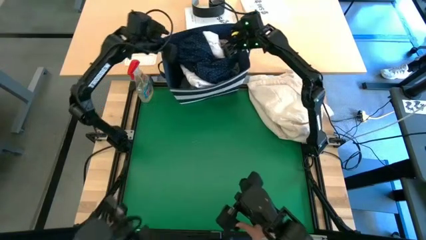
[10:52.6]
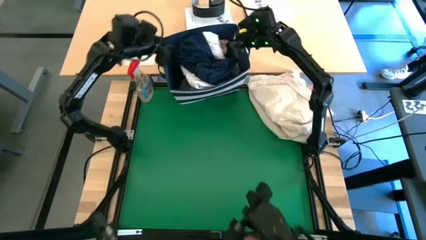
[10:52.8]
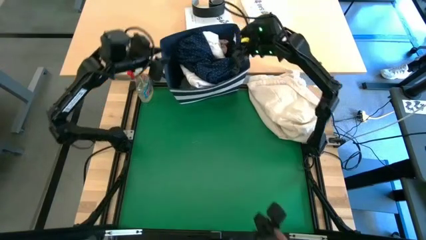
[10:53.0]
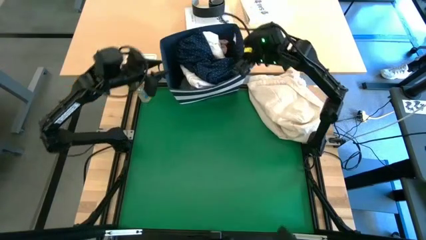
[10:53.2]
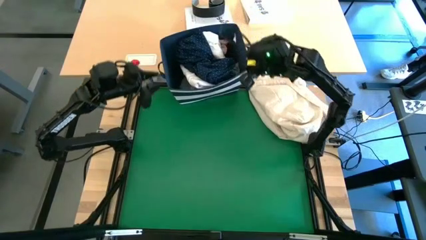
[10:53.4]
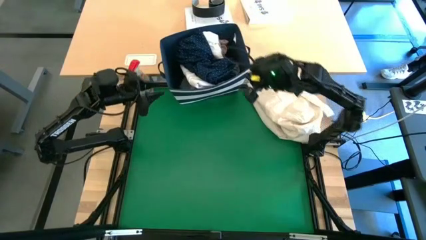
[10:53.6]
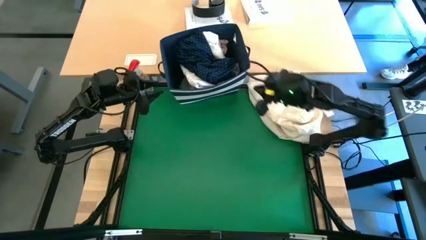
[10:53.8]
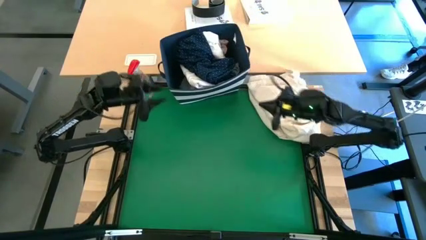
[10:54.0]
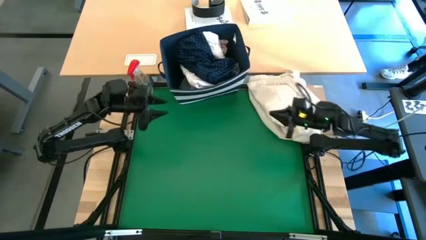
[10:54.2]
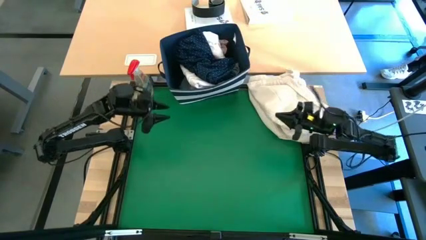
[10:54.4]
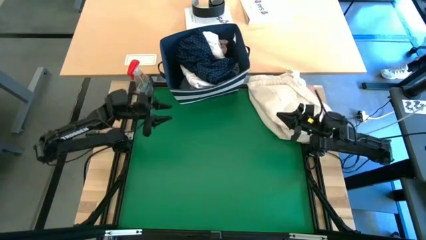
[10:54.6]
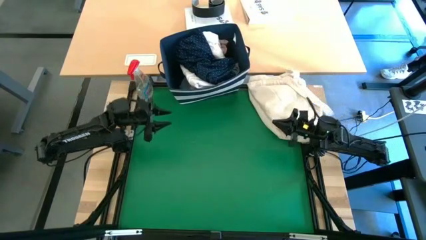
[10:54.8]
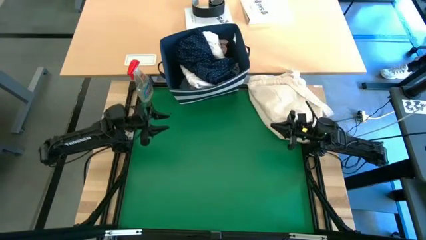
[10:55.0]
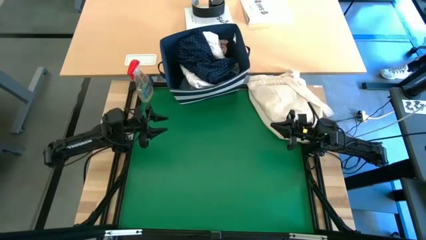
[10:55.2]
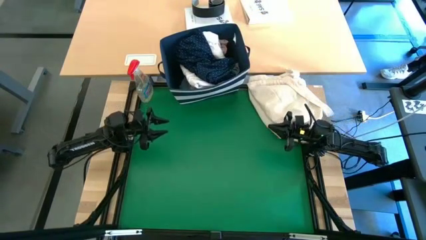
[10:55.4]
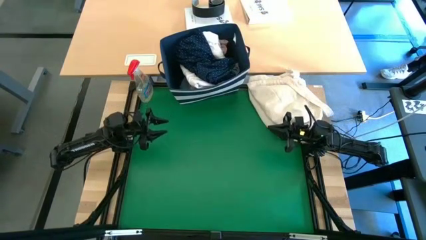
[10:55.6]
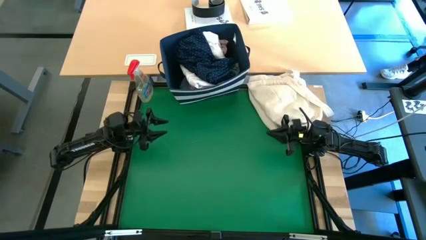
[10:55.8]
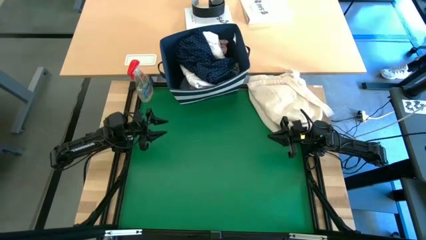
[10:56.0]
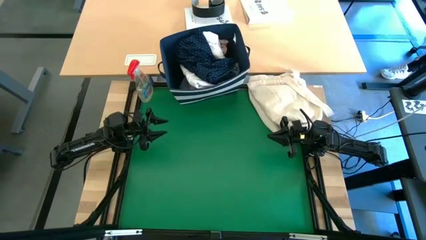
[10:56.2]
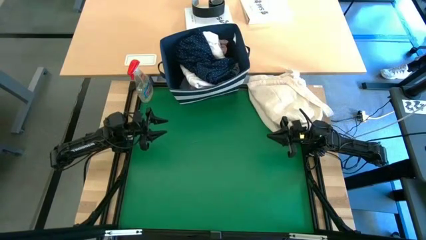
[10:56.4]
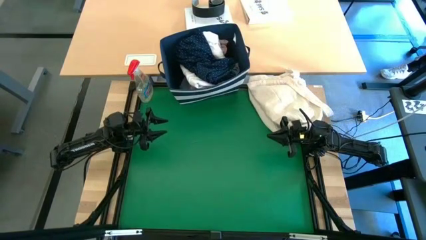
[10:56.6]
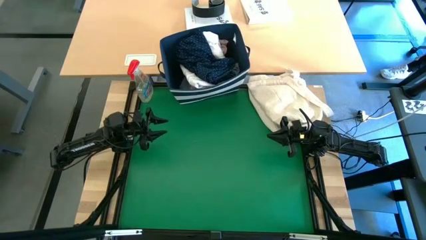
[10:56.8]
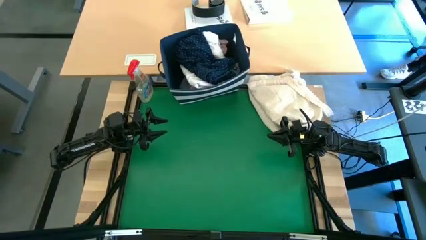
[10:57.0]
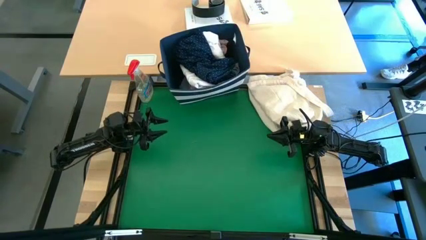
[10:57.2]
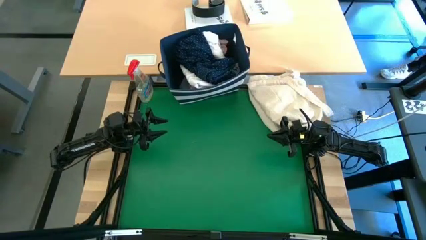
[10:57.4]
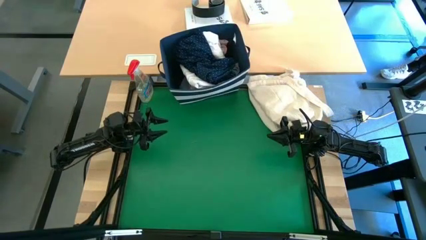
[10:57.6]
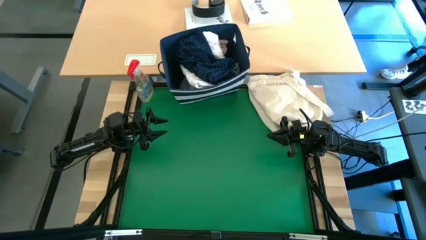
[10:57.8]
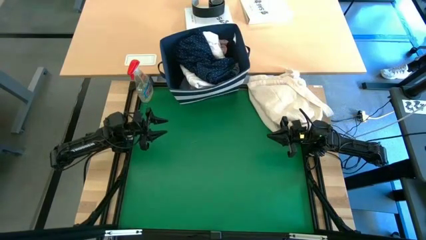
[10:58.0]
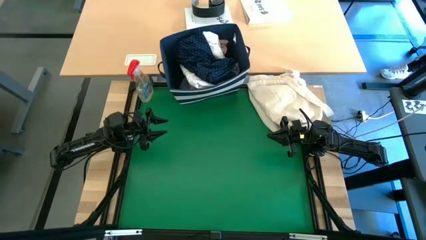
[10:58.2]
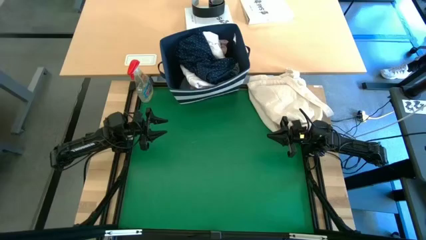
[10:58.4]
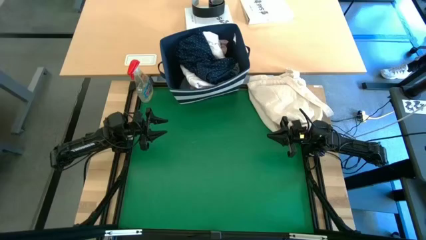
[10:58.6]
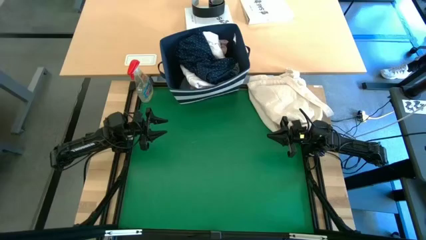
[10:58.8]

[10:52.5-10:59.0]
Task: Fold laundry
Return to Home Position

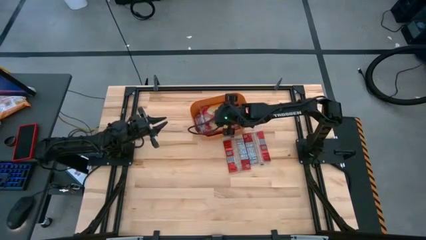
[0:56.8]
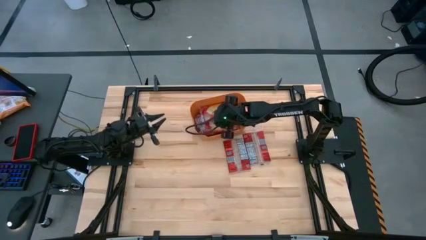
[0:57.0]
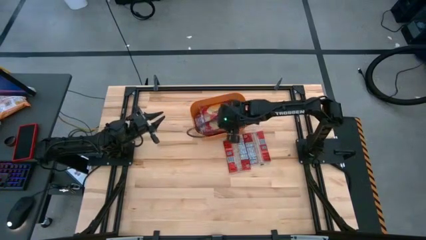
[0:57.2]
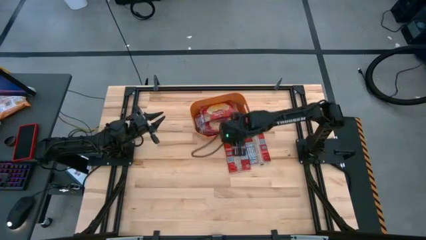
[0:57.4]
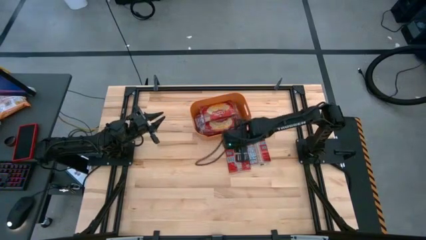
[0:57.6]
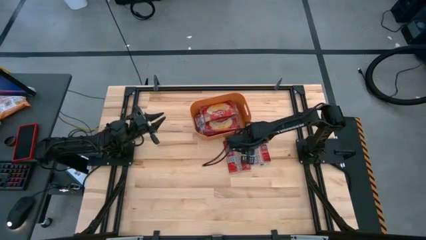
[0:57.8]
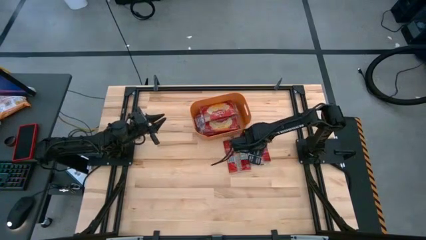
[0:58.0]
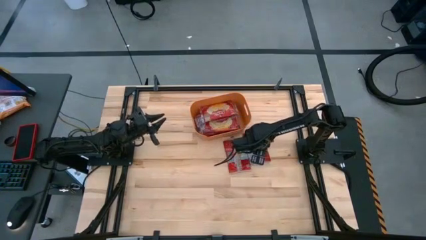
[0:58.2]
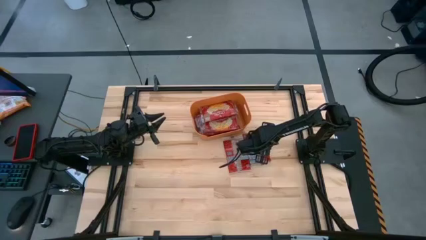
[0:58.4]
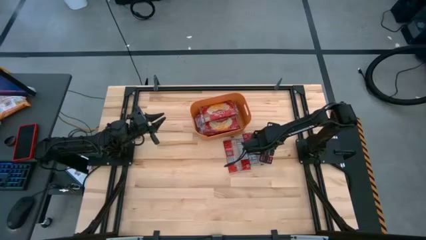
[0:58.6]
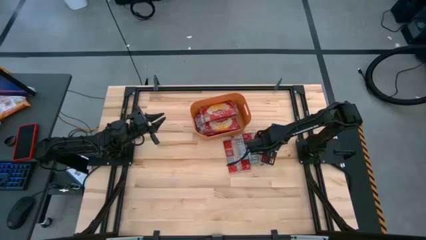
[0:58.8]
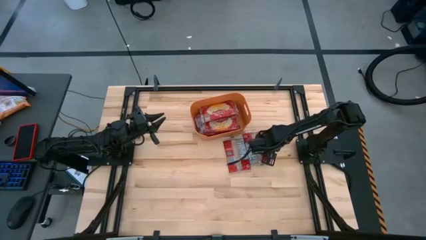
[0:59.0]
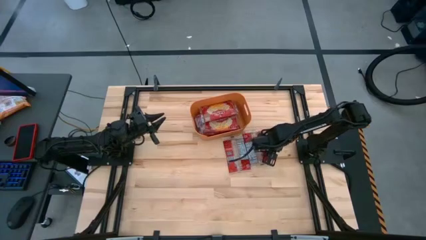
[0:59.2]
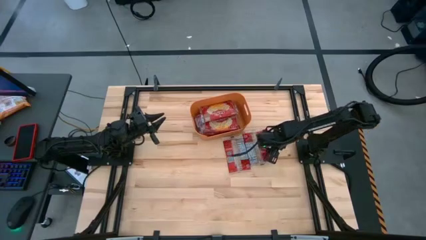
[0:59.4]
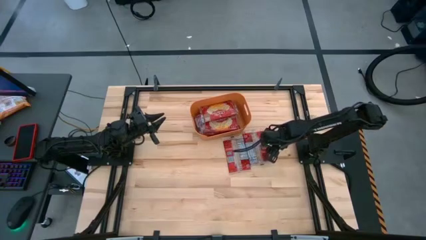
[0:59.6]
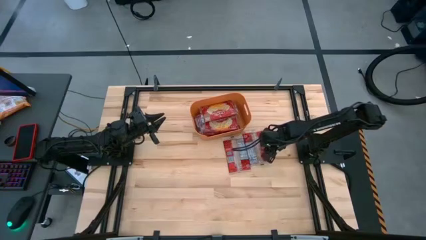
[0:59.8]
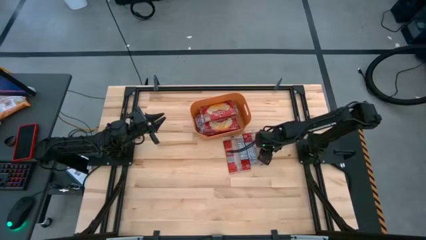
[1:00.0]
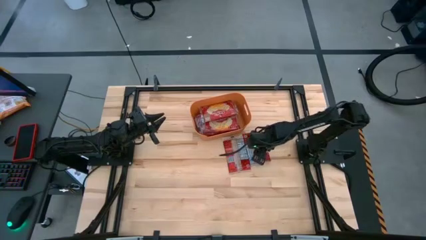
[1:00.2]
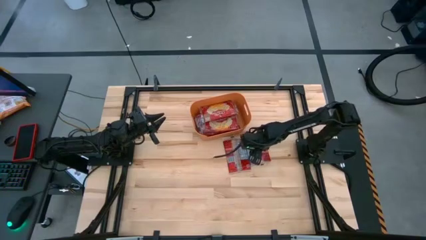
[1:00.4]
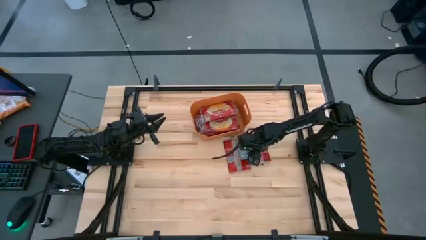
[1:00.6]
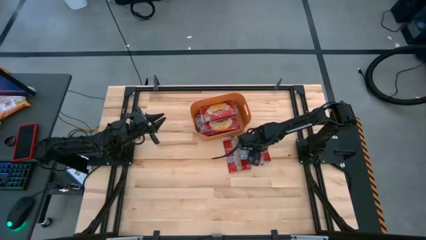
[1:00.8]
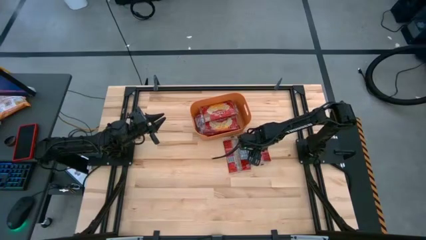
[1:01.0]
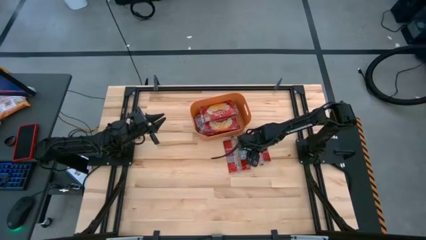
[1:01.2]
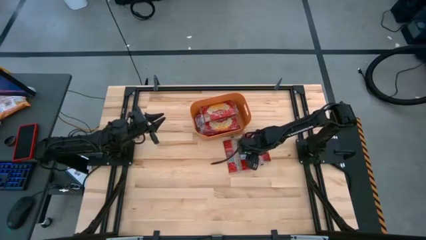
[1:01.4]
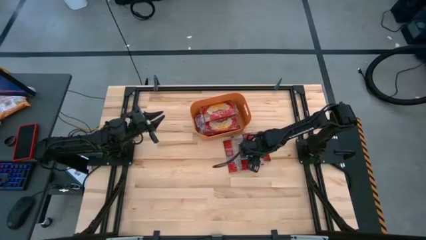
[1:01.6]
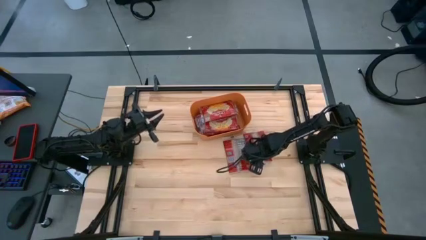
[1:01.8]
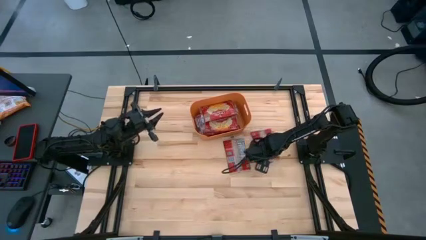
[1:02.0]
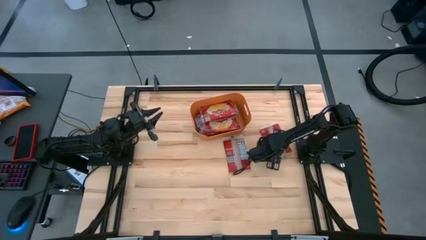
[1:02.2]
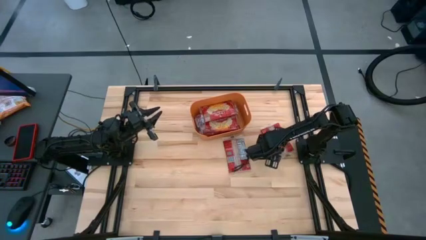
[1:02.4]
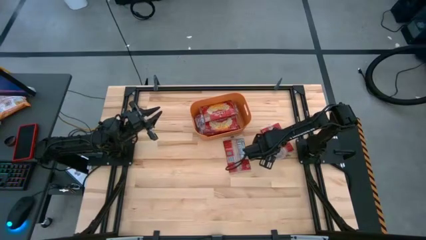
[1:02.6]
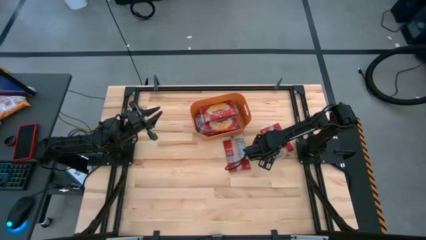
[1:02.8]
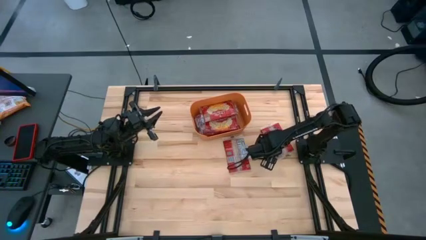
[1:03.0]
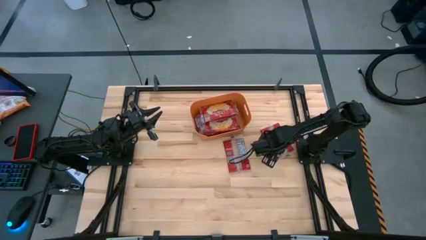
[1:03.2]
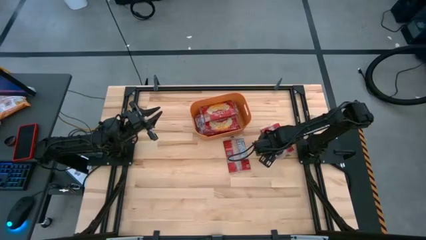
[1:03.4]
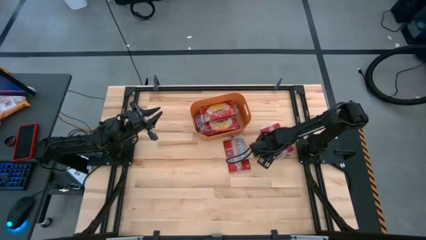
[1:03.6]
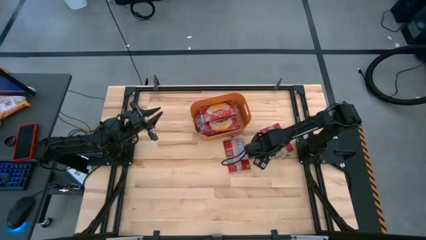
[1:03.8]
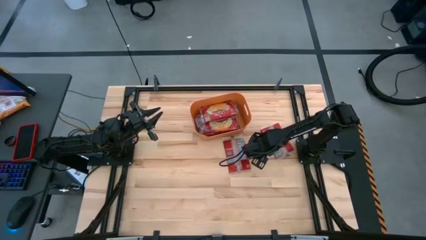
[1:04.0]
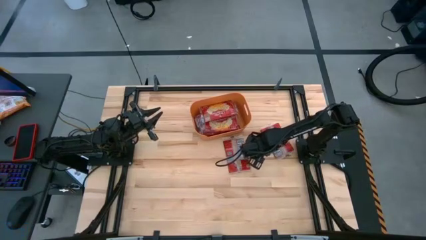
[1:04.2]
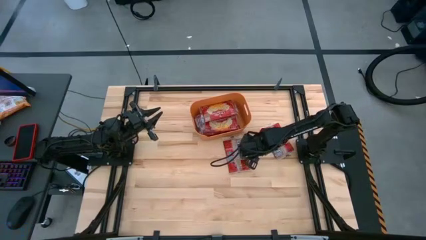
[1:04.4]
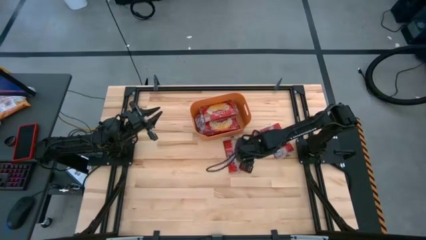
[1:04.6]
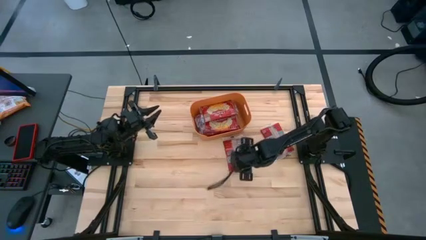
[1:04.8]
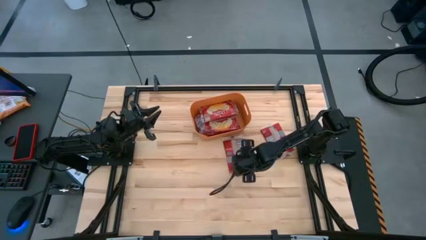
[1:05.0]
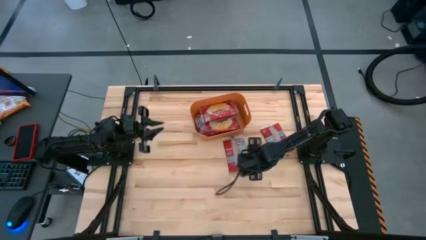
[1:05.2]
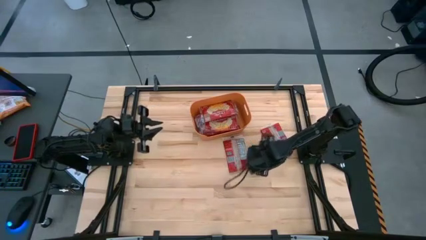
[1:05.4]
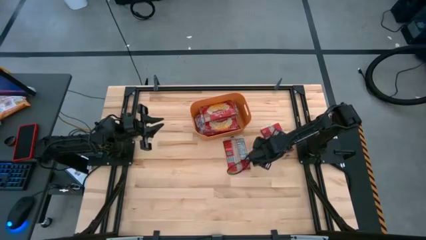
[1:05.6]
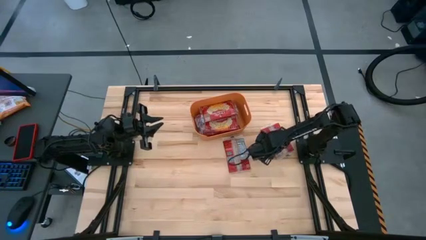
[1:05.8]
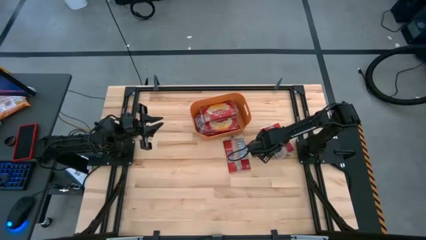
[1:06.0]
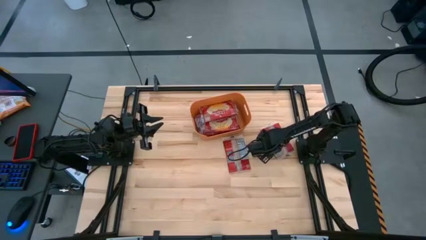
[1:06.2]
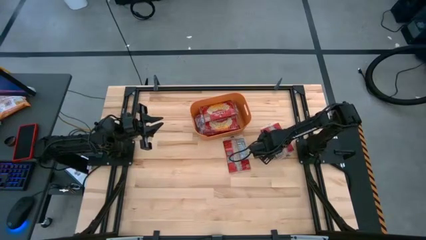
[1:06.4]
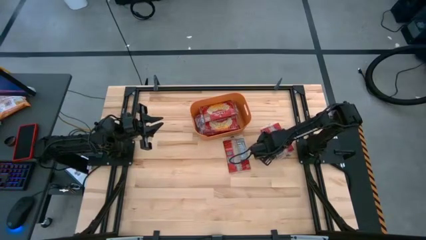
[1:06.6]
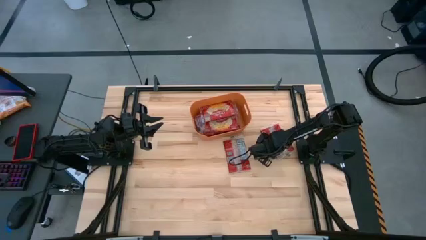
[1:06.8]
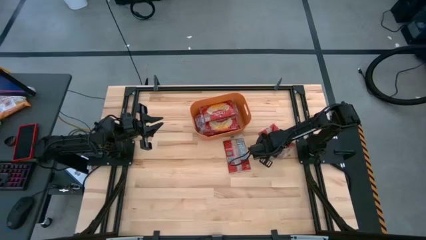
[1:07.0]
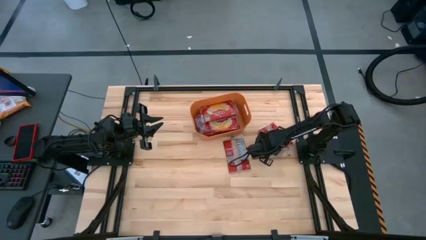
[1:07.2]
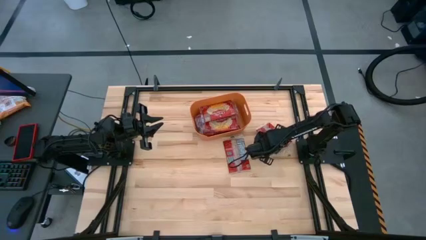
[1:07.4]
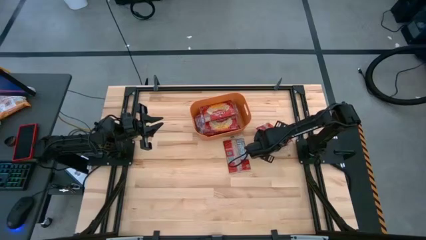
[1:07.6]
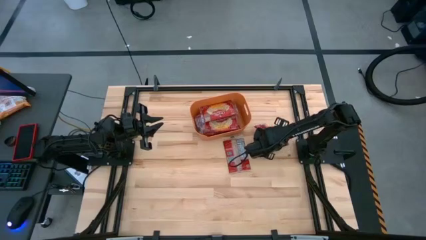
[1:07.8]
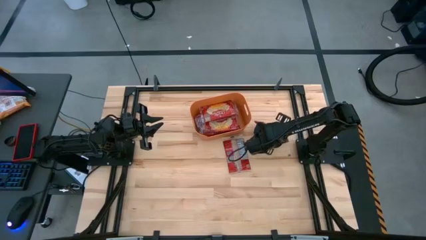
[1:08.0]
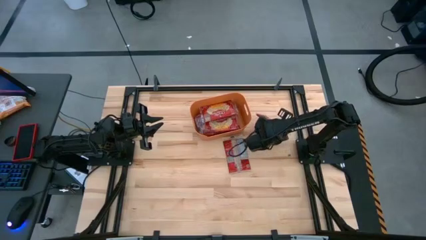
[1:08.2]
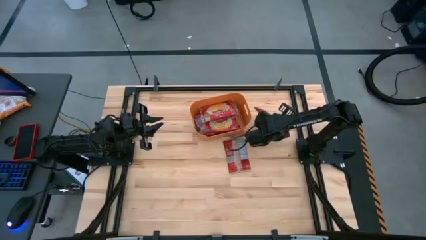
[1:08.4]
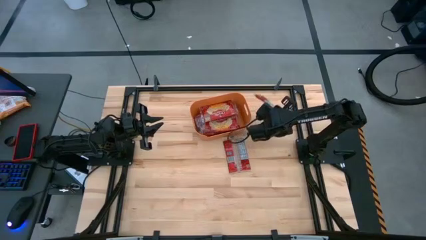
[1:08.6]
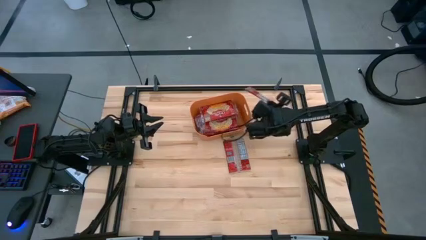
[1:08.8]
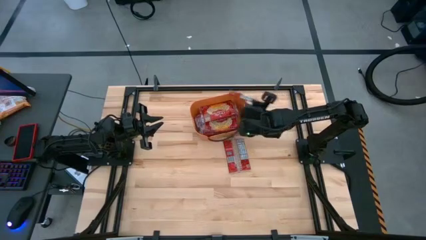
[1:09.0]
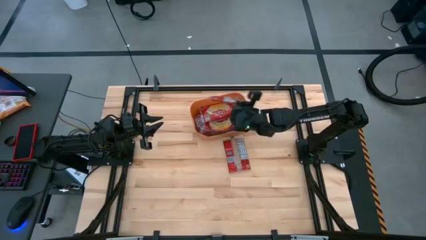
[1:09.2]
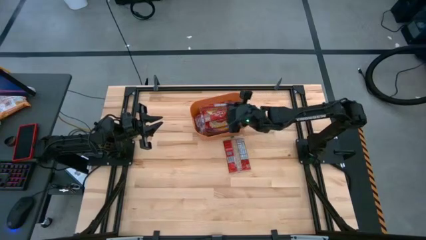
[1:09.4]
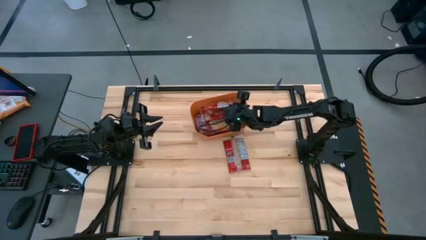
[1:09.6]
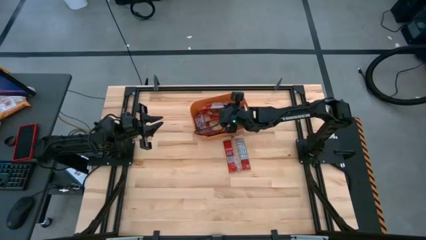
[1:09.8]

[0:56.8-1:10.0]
Task: Sort popcorn bags into baskets
Put the red popcorn bag into the orange bin
